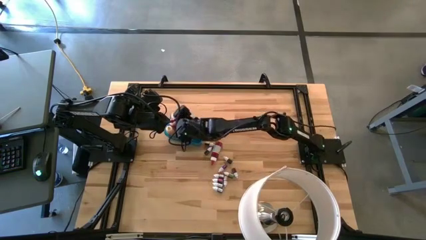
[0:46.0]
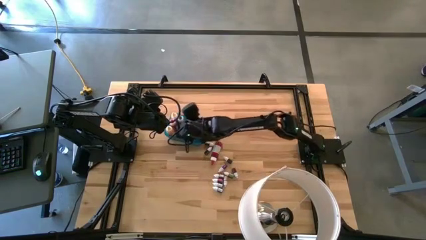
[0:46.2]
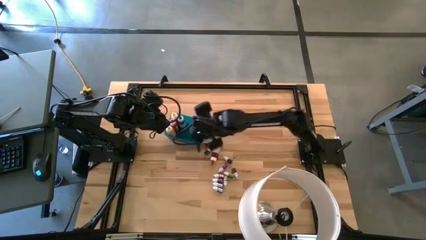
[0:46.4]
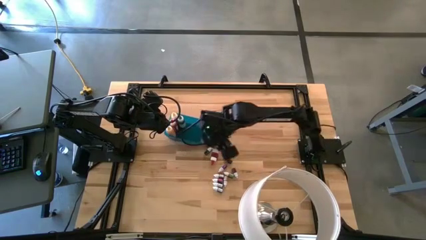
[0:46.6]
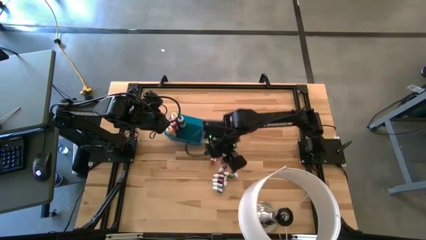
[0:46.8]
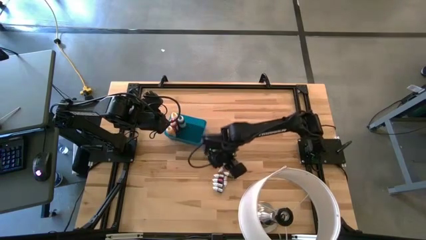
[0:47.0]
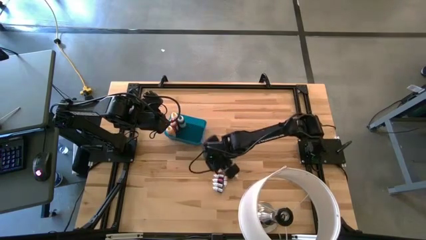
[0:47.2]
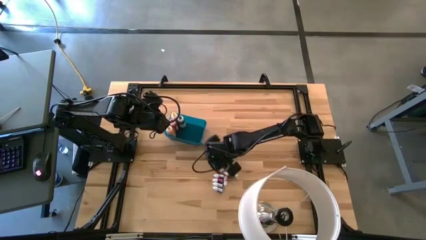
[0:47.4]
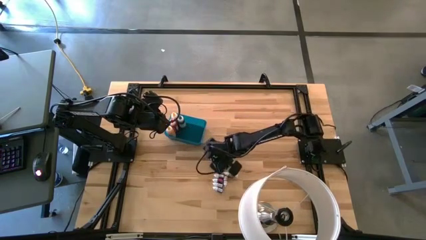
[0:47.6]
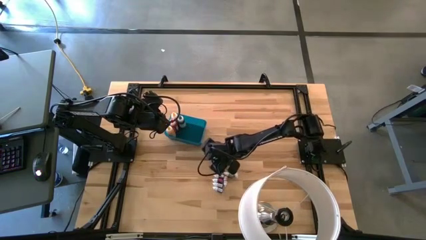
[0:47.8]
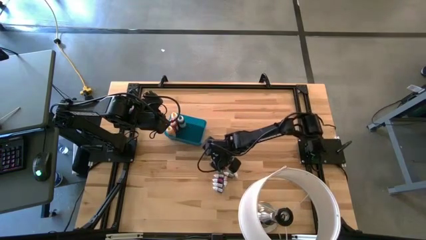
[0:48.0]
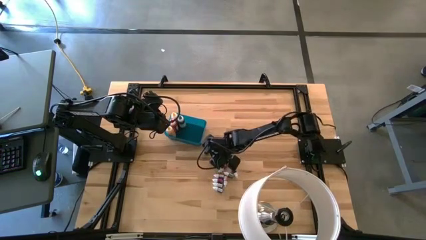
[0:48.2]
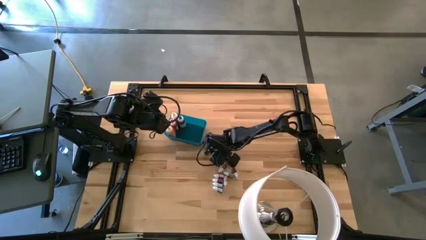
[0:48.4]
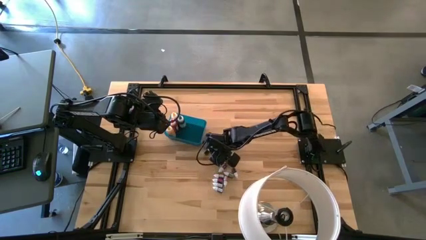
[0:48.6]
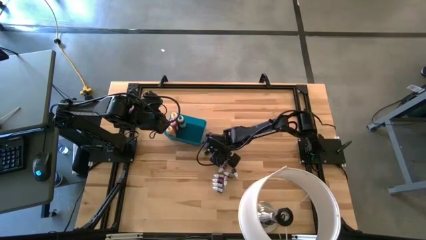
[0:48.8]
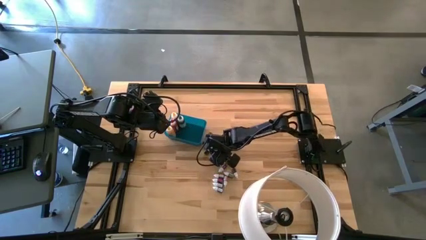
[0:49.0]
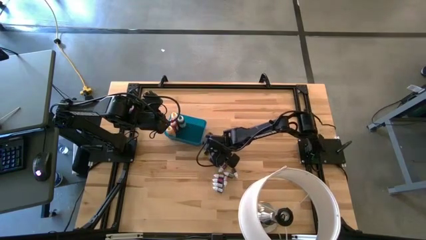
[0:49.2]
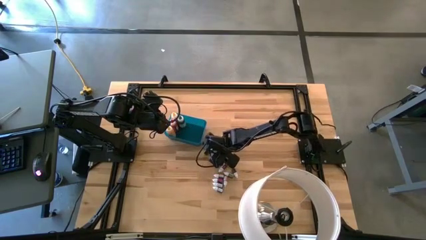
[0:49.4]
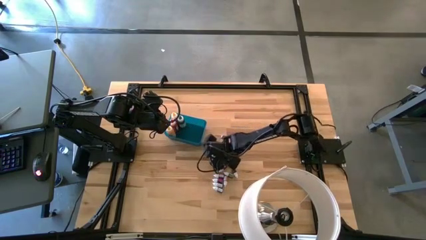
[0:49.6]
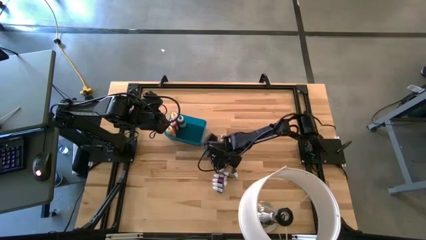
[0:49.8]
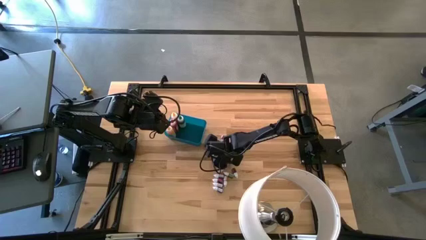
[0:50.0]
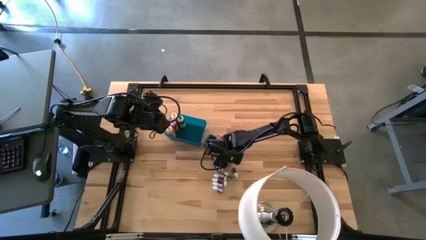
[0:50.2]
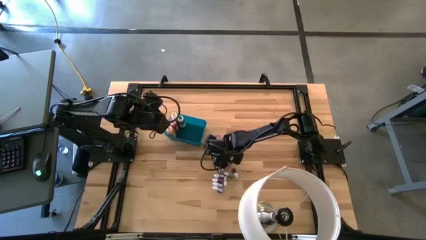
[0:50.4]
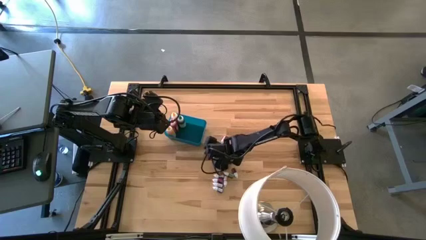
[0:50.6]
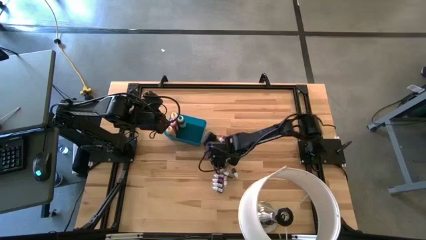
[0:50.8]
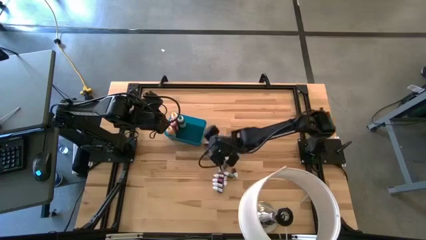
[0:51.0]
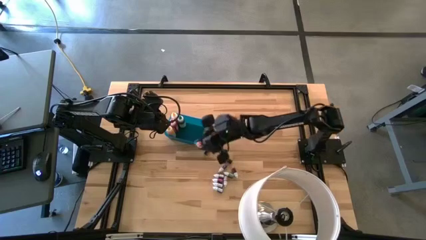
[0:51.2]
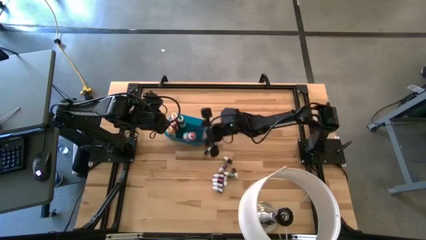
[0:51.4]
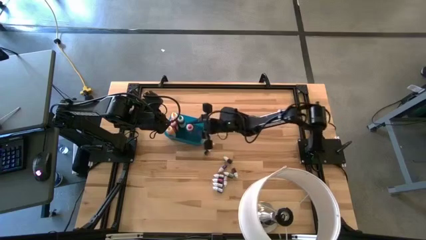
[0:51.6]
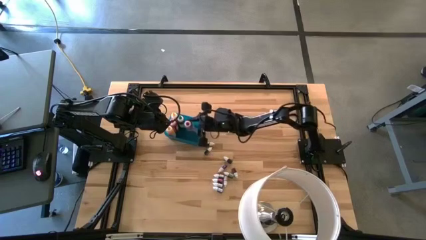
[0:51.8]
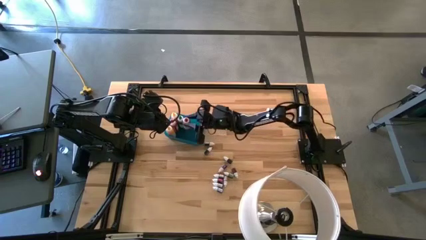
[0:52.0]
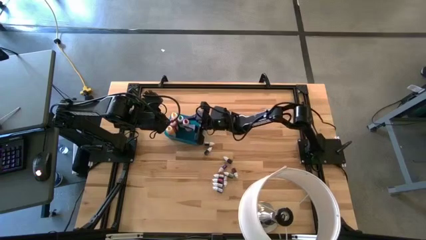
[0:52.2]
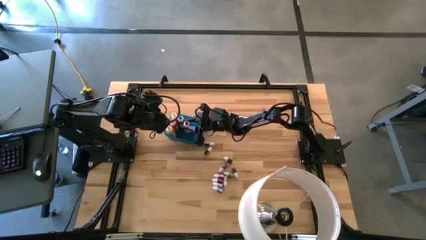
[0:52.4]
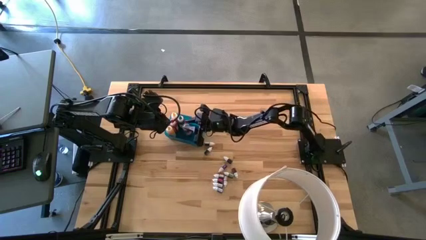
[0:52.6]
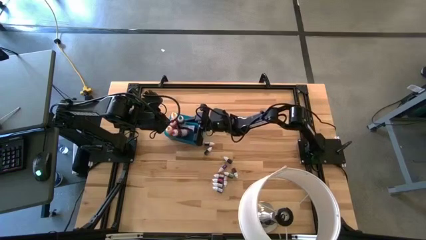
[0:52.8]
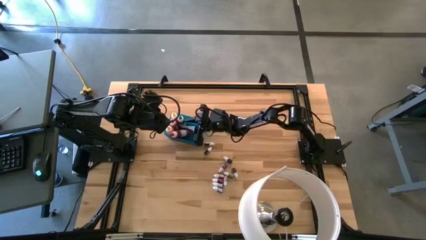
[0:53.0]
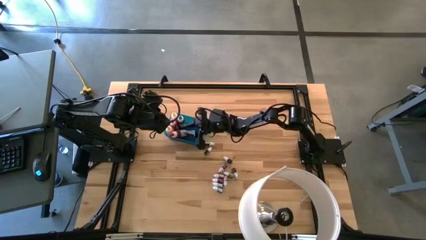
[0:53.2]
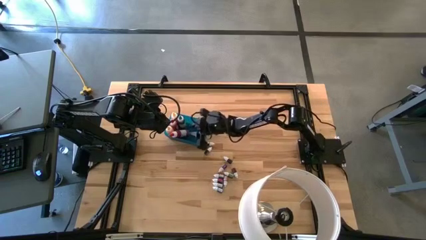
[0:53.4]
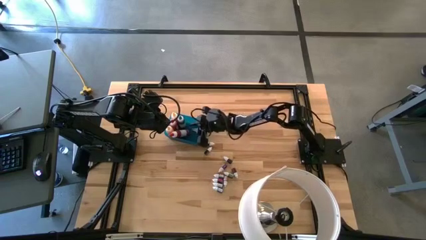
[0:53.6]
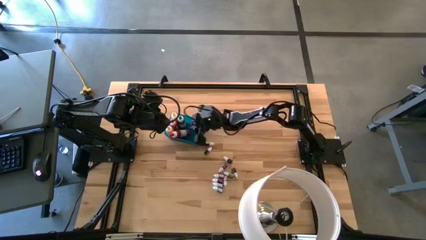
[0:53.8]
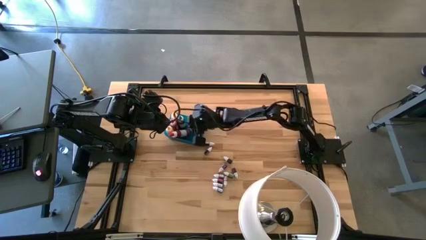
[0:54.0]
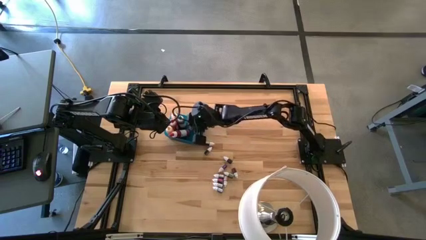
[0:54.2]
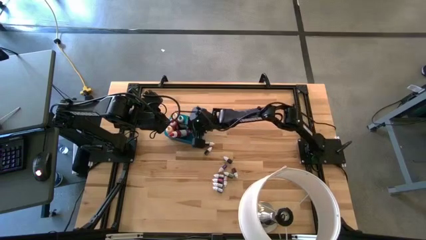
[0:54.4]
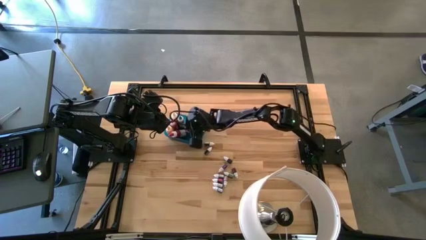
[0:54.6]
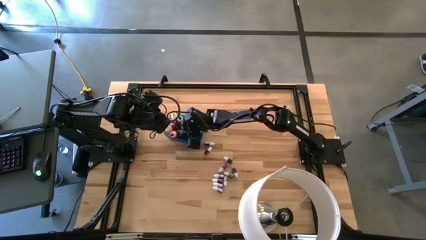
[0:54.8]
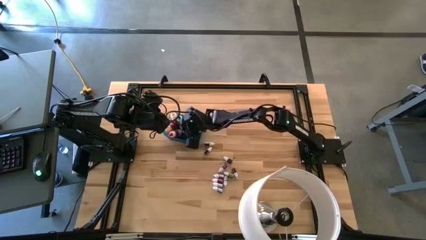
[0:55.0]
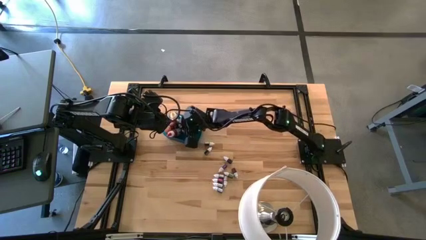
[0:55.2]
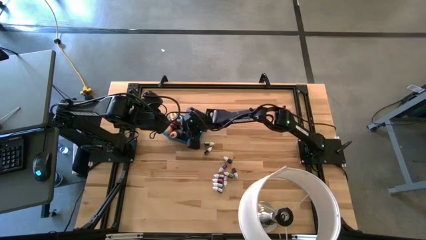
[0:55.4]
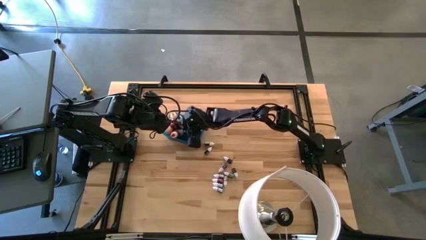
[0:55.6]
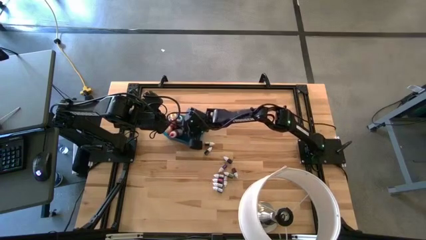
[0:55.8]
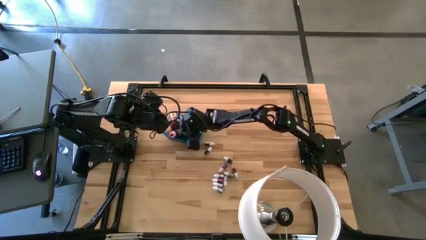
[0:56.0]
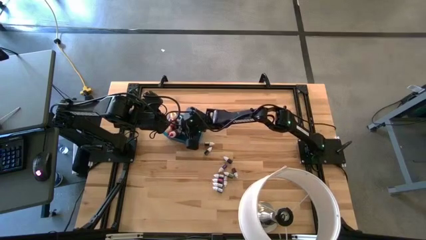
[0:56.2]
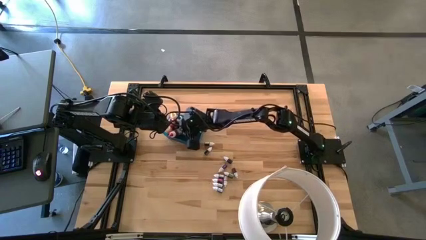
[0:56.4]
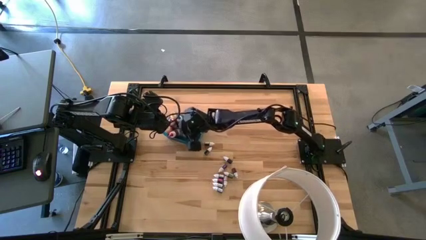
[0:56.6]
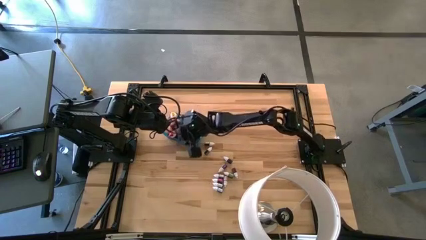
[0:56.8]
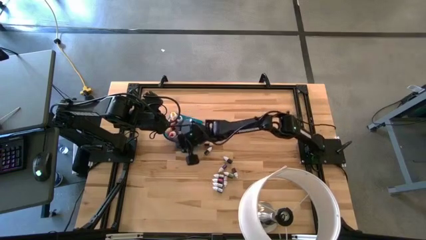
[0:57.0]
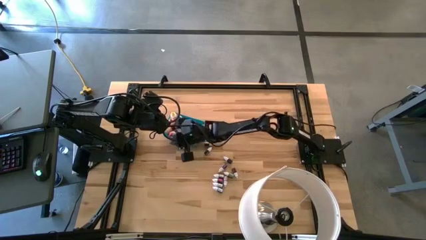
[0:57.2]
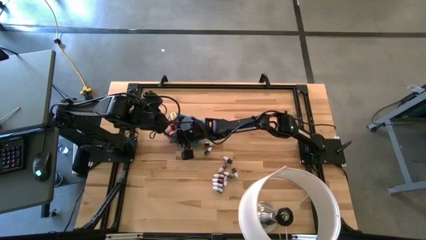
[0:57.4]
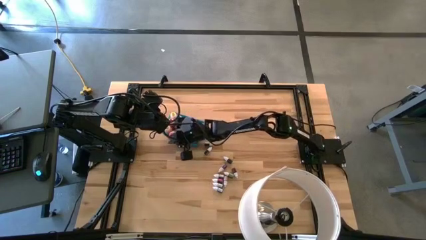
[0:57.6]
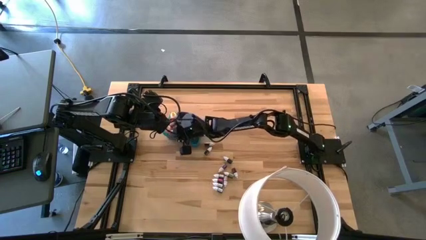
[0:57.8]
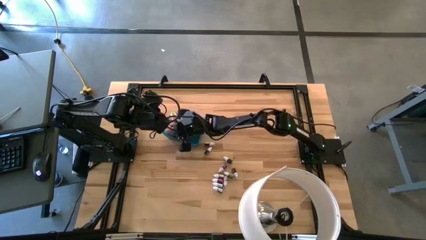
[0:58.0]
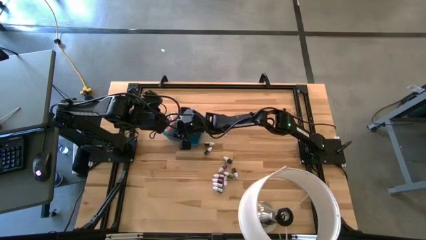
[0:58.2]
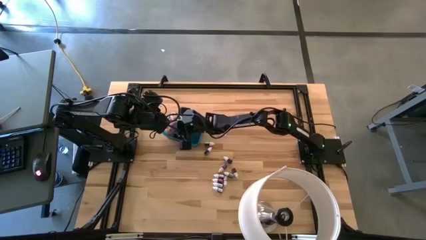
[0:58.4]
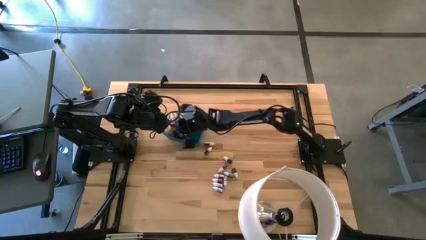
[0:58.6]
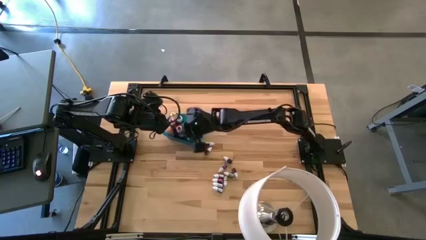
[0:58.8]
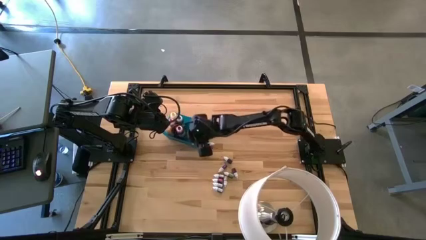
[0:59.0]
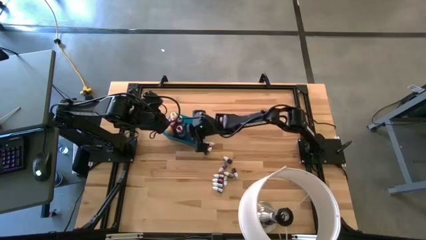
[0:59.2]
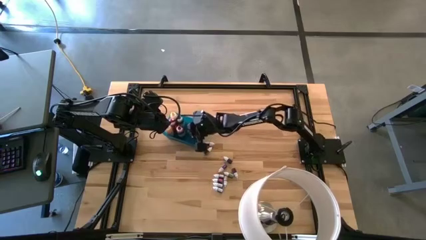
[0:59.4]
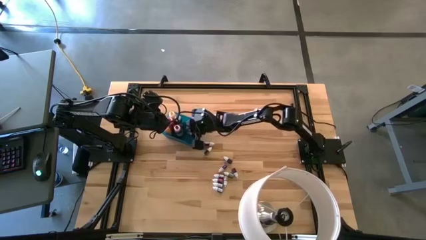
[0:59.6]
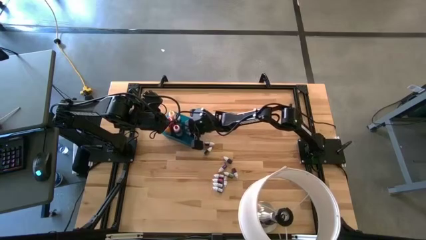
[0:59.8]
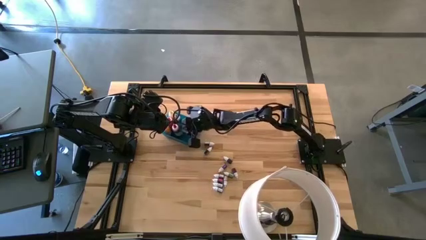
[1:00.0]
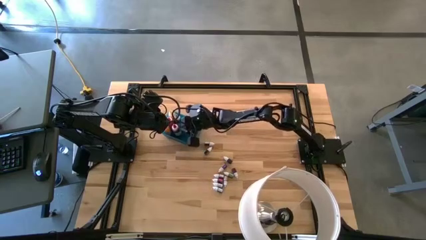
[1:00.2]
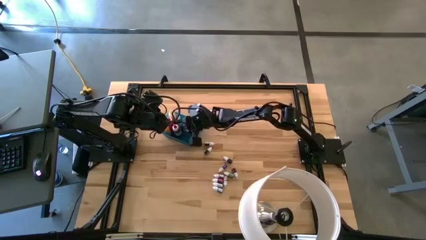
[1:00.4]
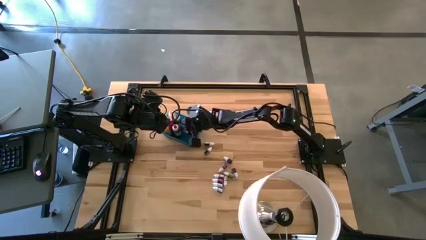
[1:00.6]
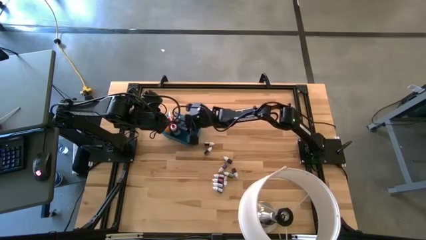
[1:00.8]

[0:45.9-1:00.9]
Task: Pick & Place food coloring
Put the large red food coloring bottle into the blue bin

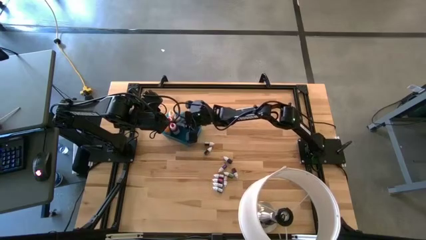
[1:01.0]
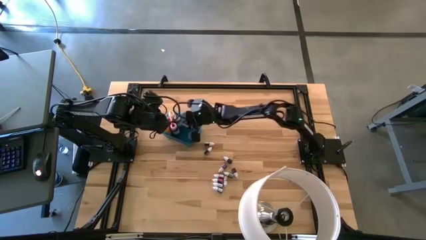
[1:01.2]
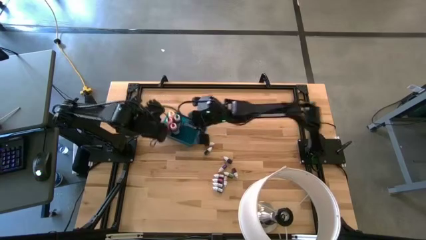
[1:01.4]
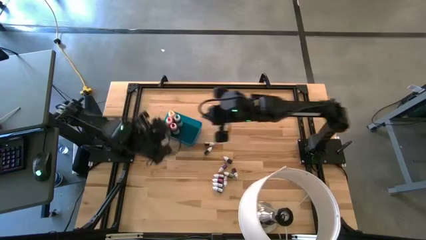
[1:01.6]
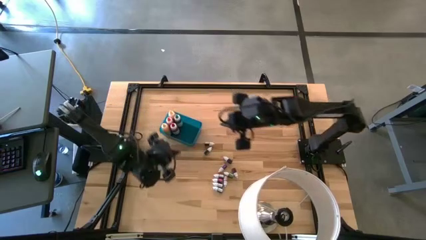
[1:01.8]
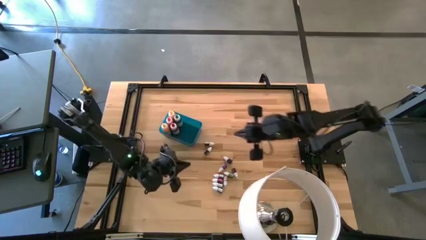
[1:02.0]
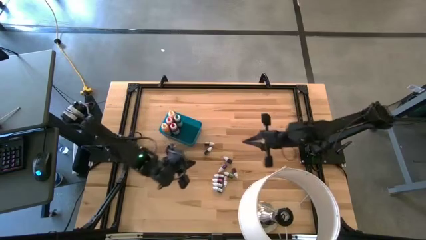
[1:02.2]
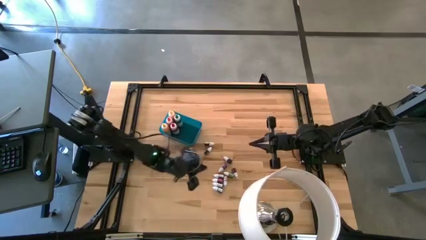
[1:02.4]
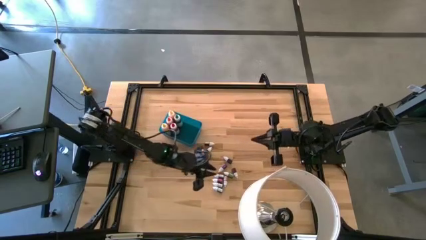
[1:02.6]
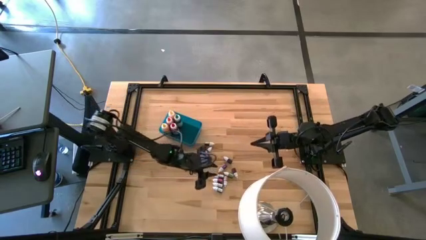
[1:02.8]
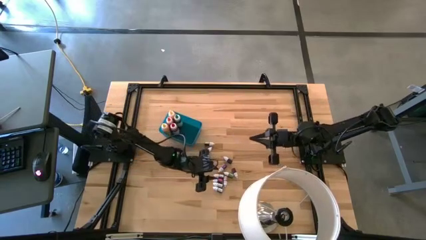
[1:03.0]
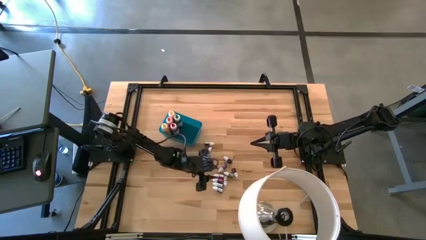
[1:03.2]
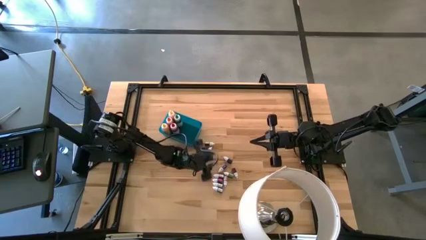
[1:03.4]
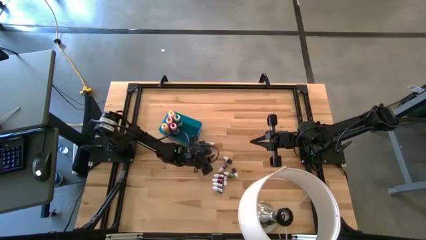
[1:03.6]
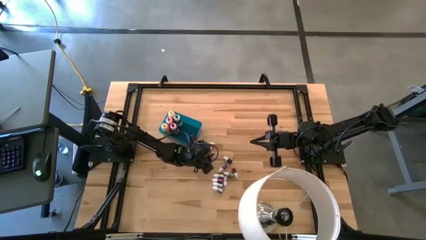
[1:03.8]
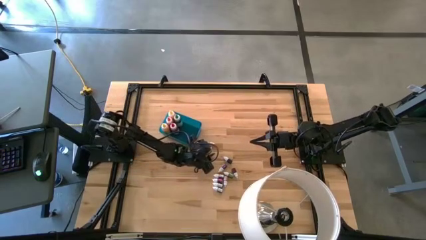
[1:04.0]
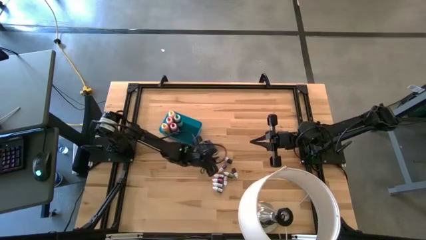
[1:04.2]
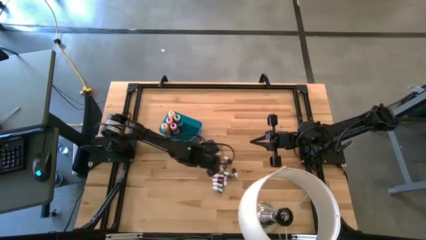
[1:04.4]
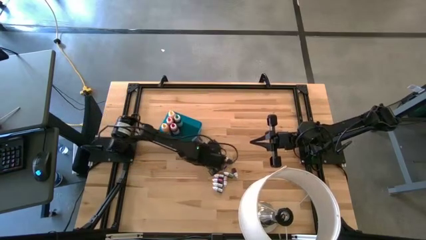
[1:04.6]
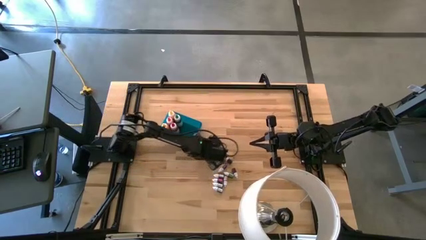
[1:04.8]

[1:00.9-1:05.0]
Put the small dark green food coloring bottle into the blue bin
